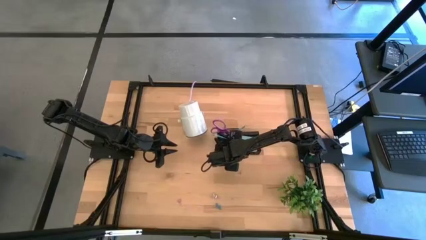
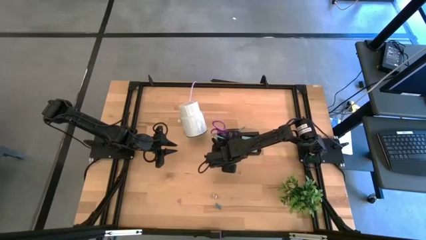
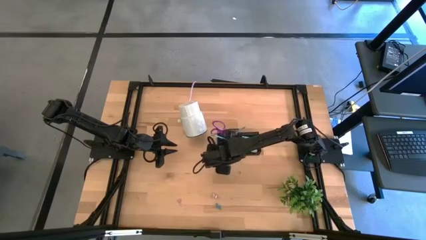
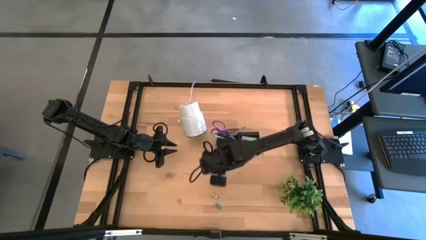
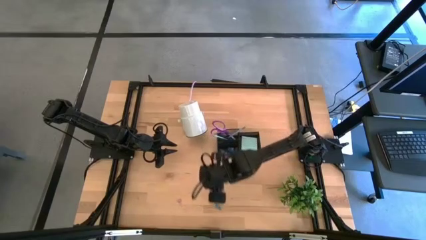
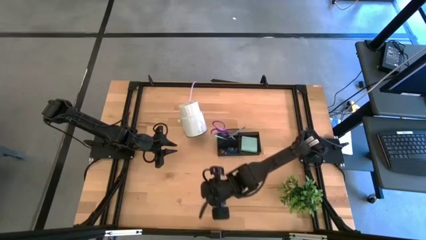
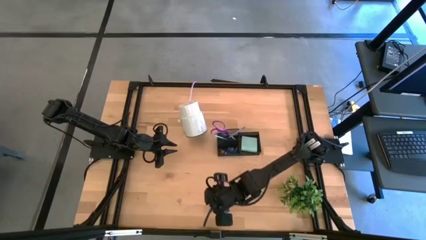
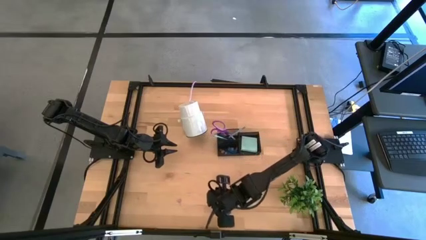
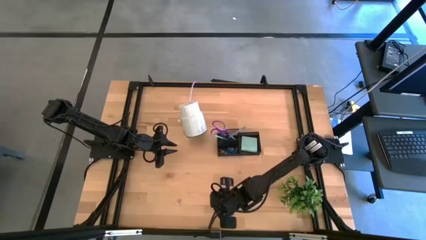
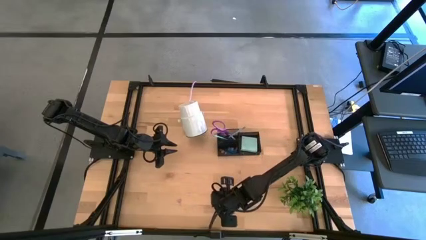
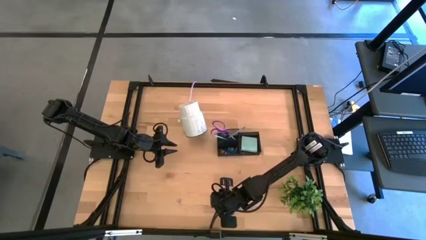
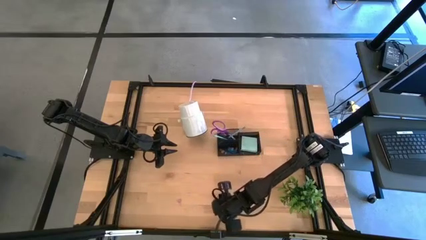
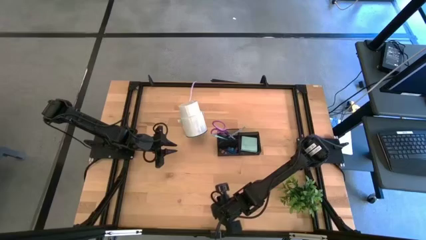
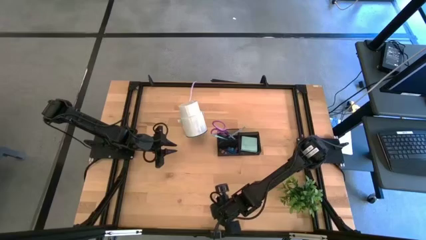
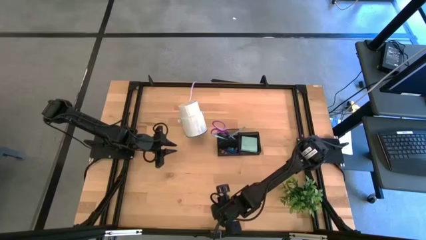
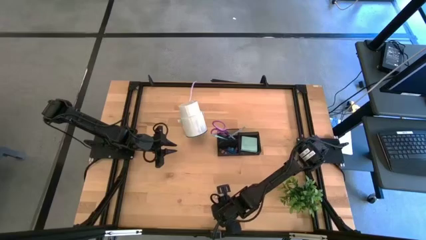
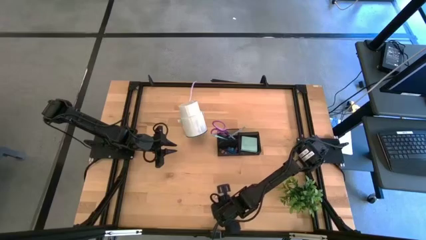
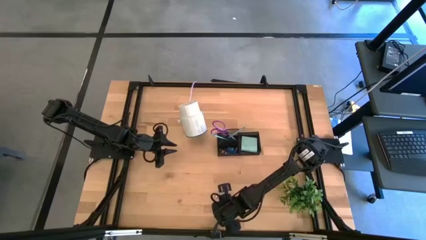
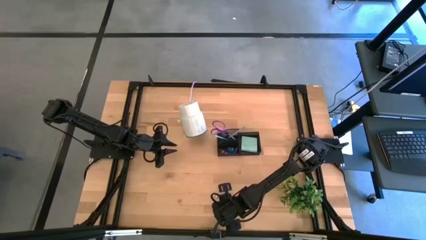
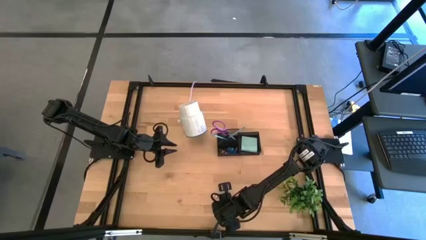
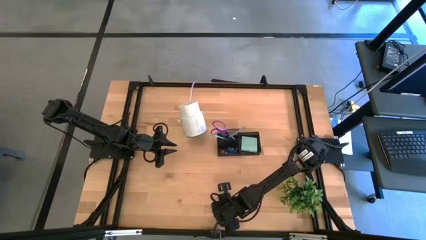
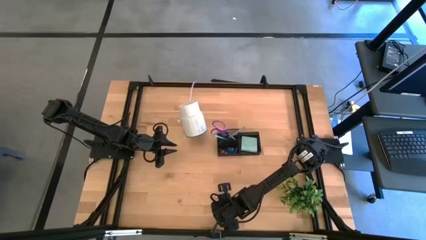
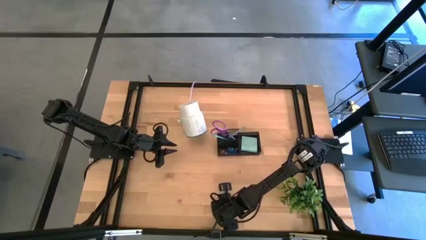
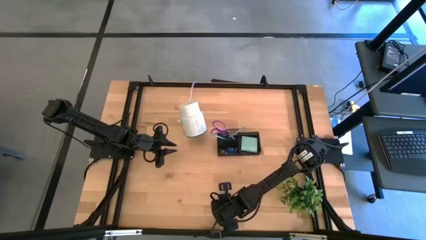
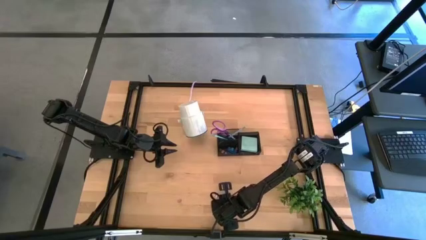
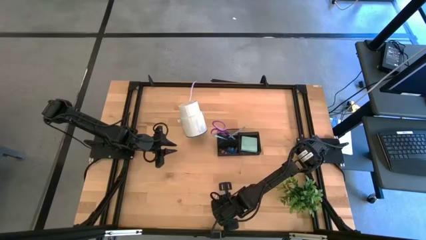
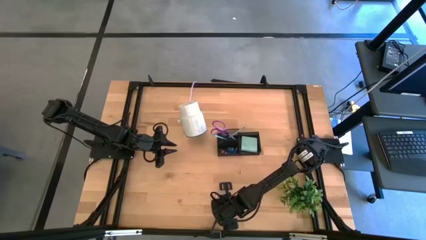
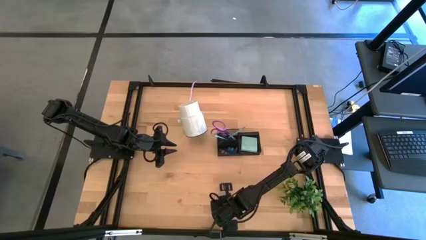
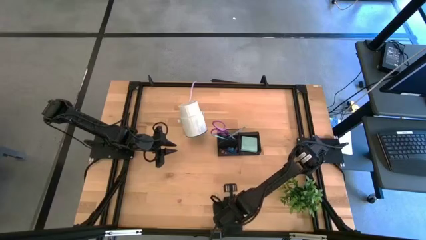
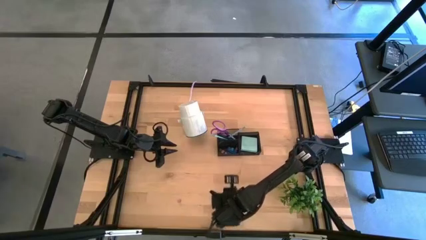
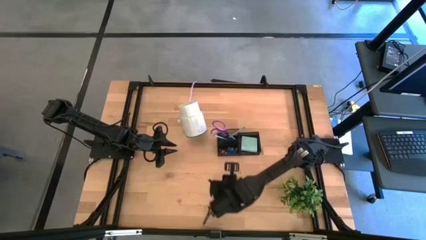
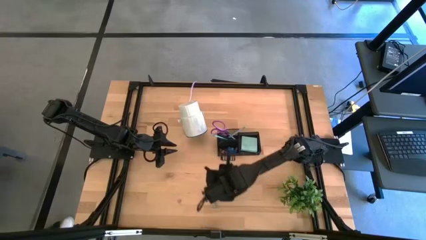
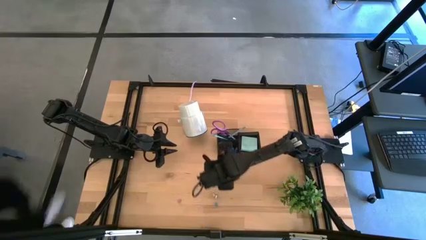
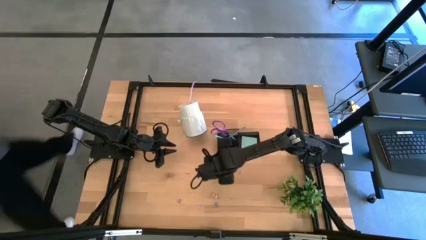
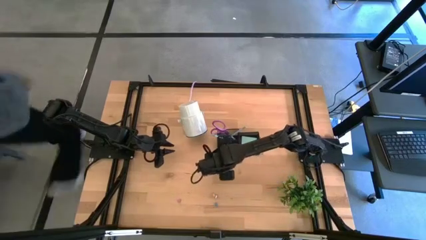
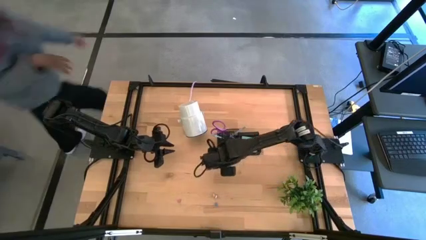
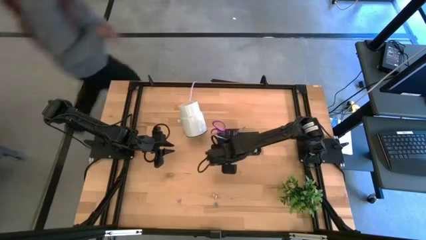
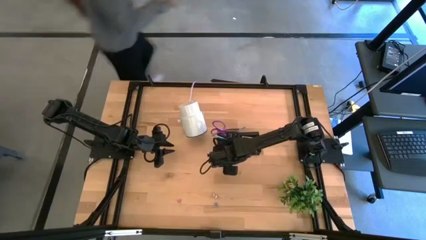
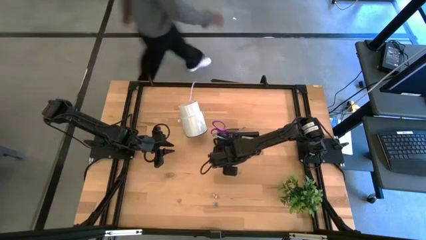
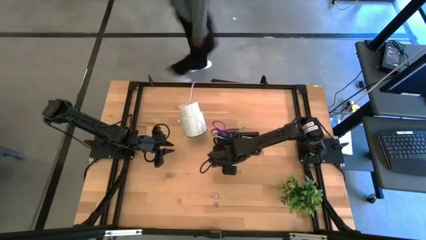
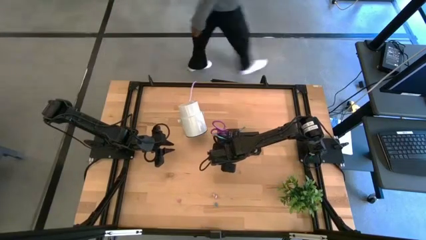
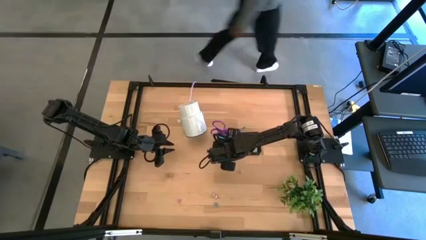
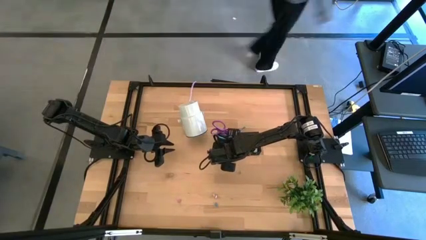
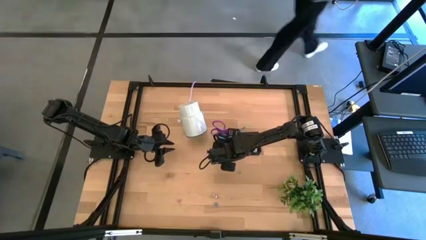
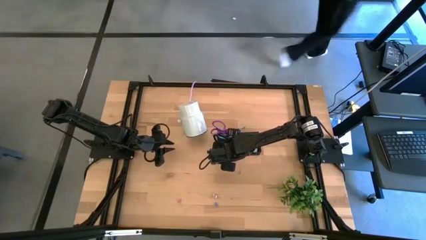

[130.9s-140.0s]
Task: Pick and place office supplies into organizer
Put the green binder clip into the black desk organizer

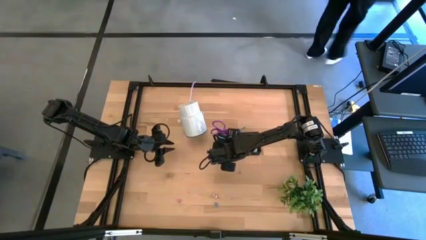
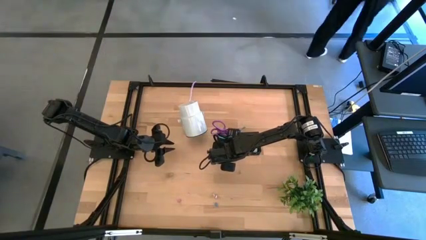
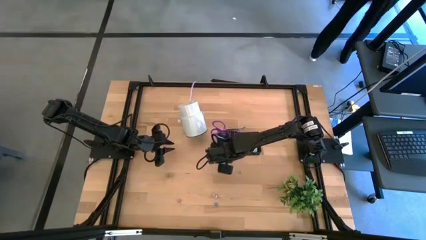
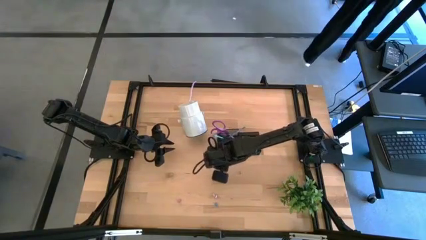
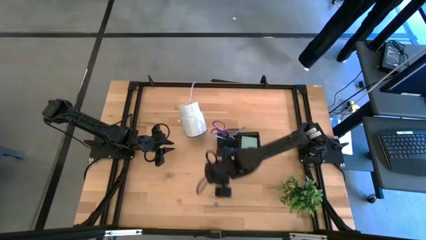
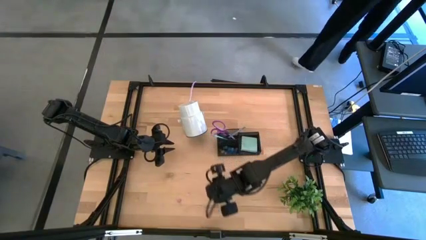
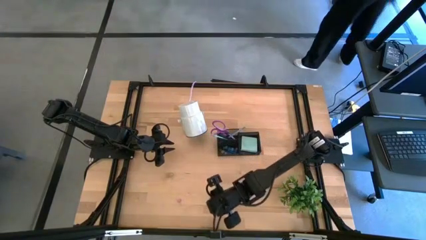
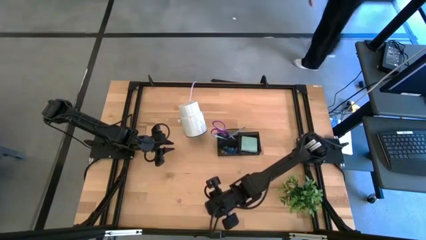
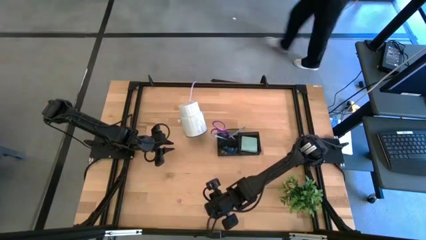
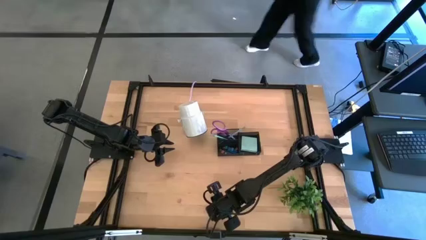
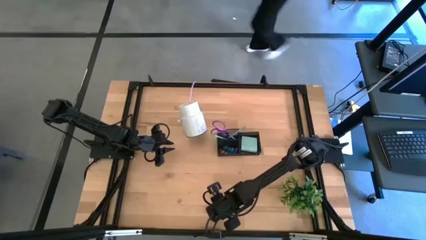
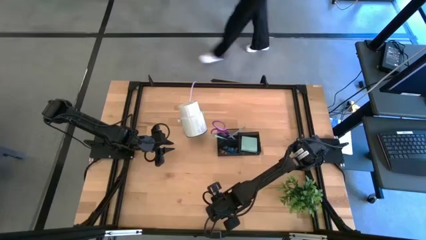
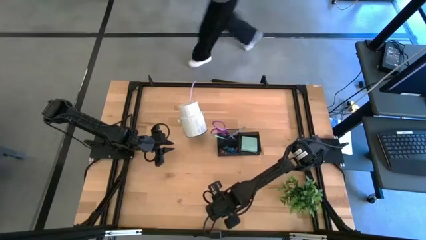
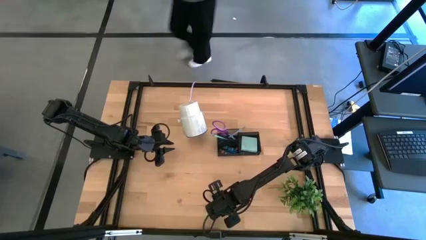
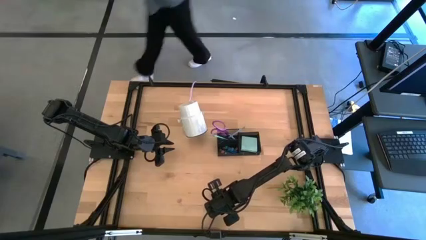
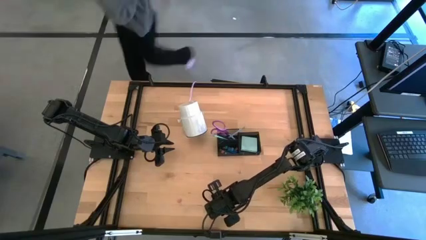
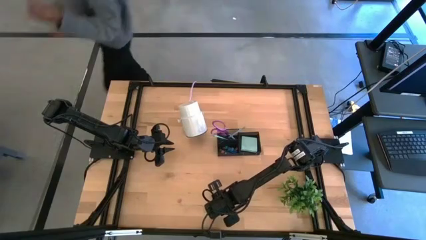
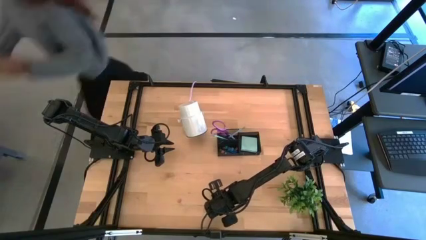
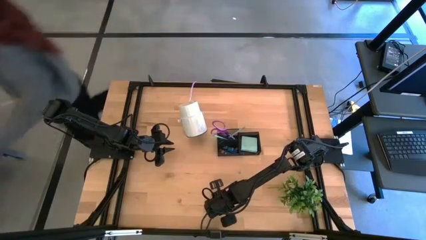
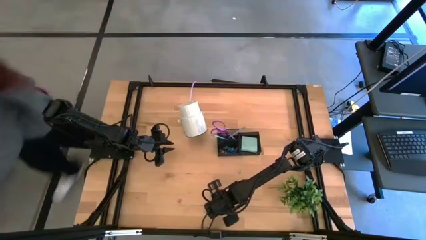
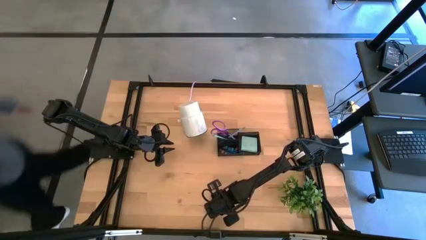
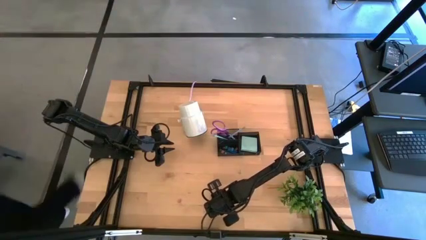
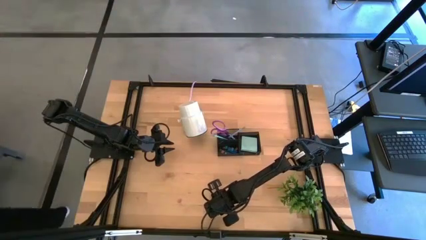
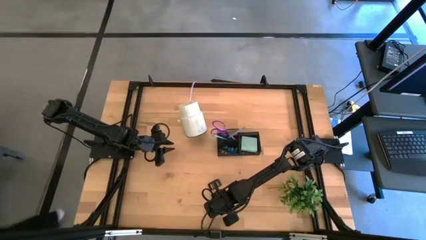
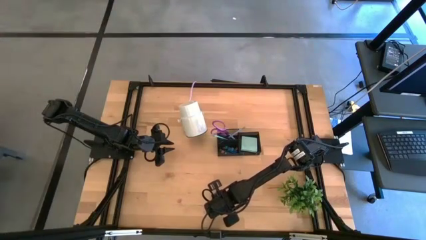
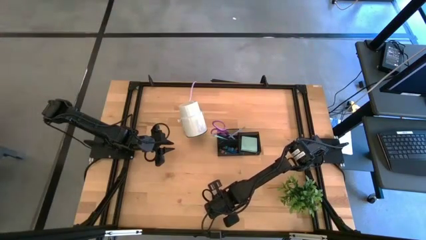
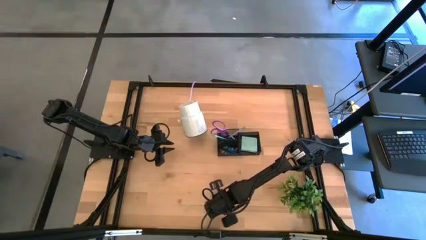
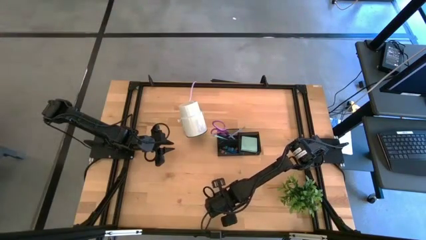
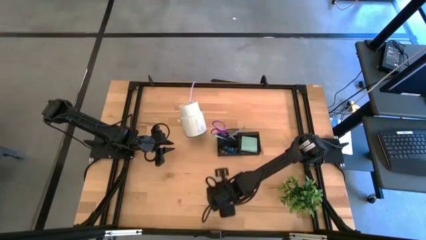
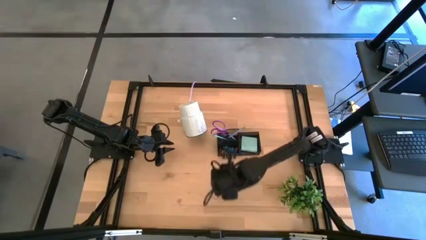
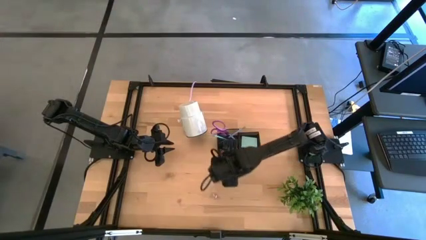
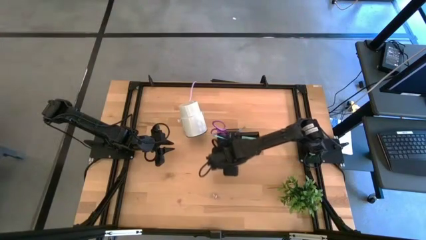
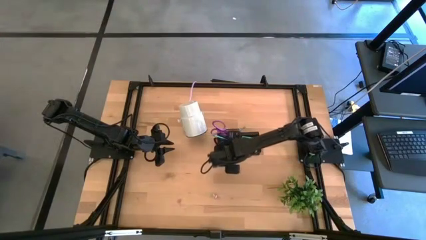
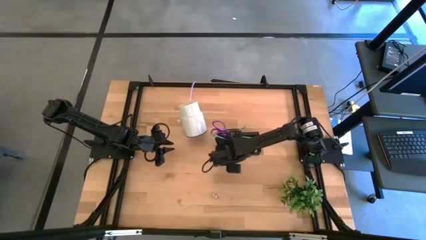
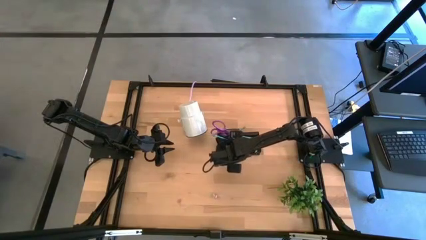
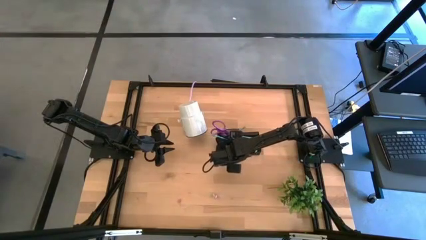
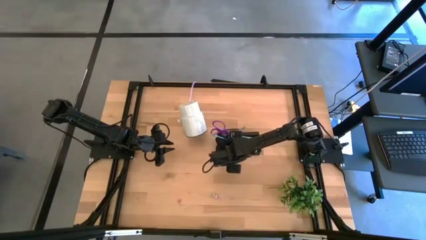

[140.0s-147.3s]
Put the blue binder clip into the black desk organizer
